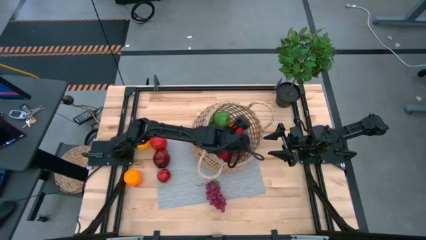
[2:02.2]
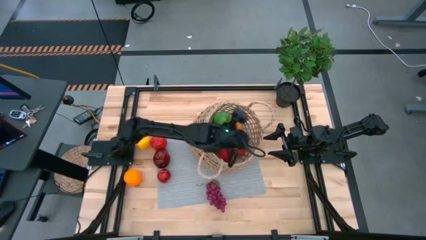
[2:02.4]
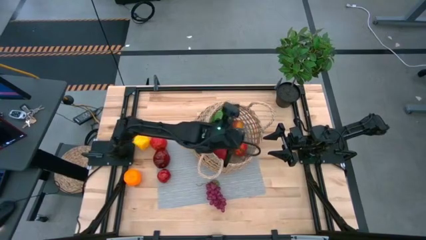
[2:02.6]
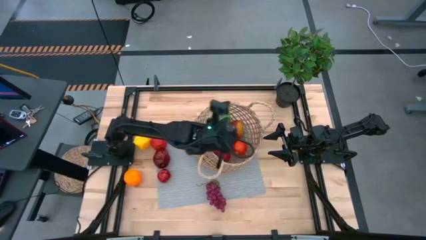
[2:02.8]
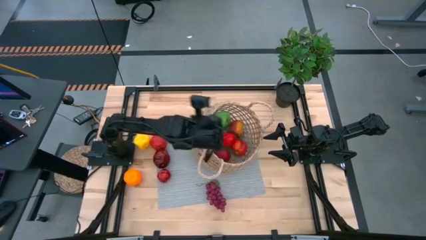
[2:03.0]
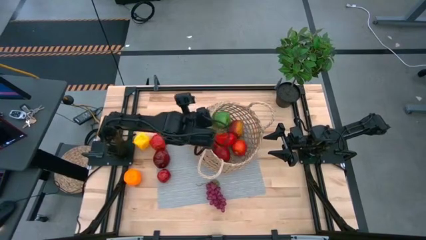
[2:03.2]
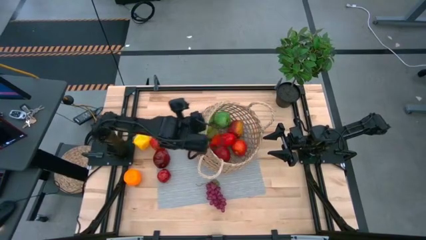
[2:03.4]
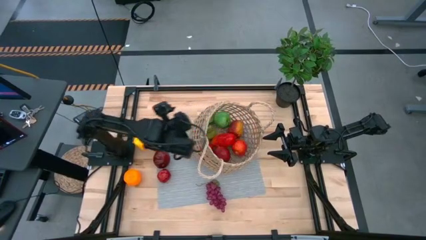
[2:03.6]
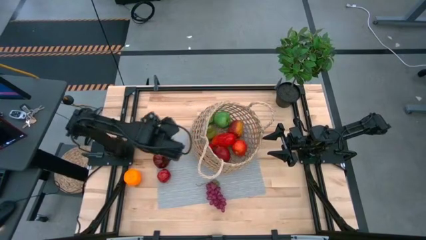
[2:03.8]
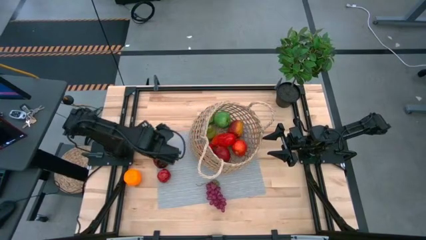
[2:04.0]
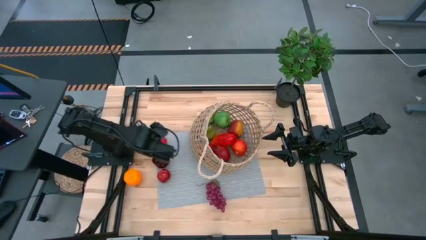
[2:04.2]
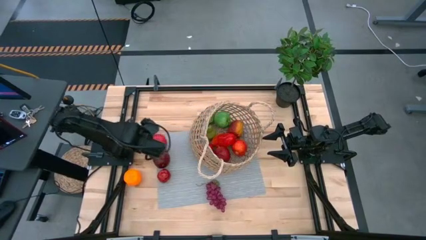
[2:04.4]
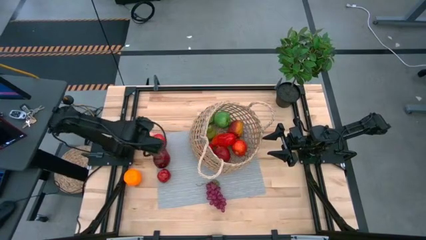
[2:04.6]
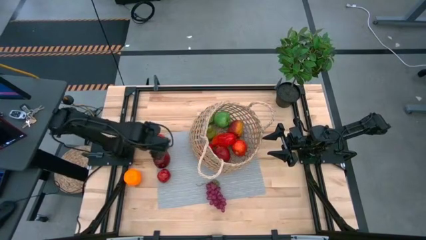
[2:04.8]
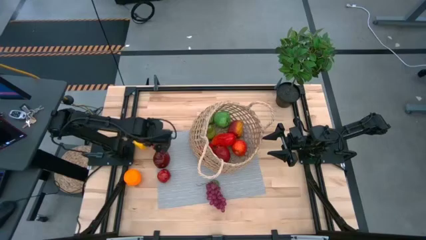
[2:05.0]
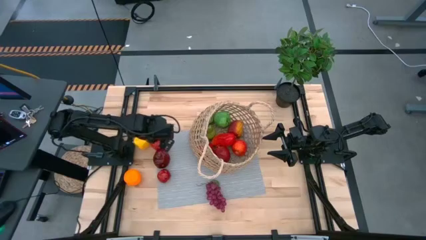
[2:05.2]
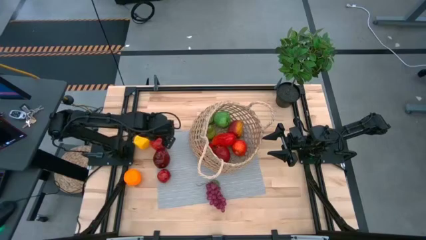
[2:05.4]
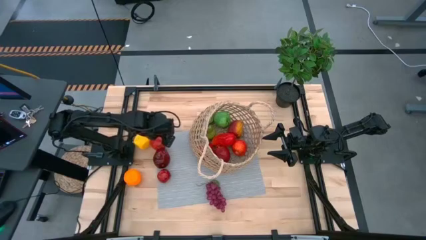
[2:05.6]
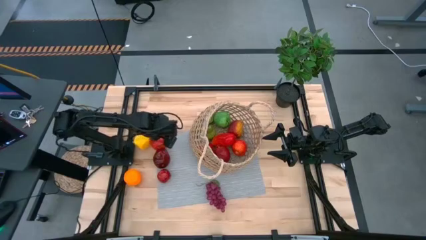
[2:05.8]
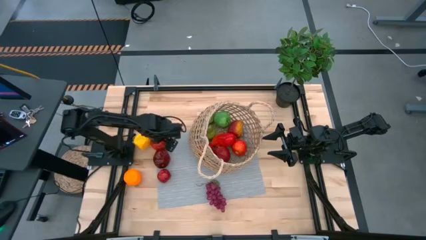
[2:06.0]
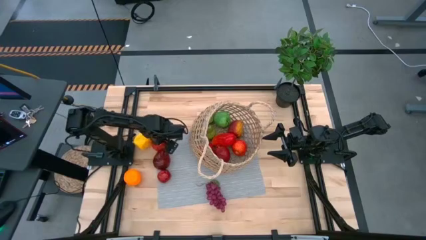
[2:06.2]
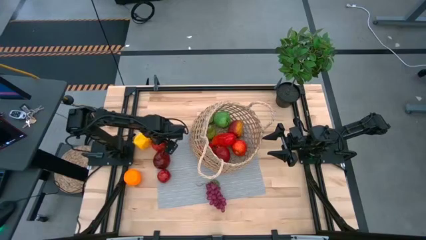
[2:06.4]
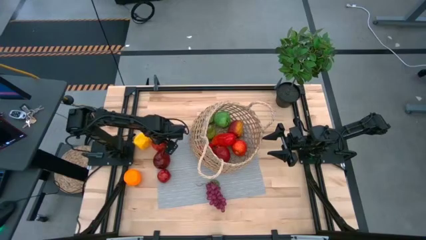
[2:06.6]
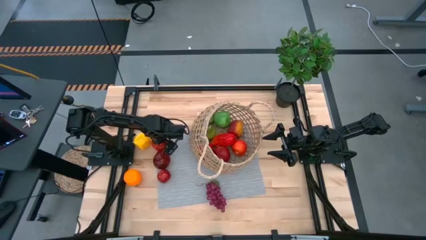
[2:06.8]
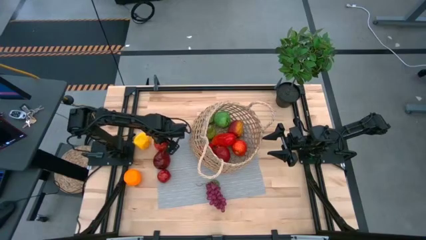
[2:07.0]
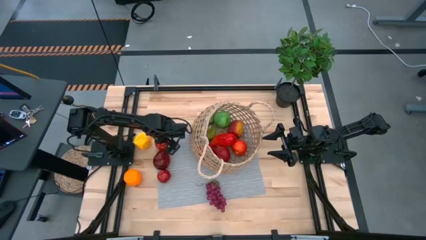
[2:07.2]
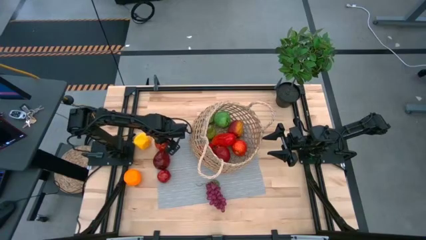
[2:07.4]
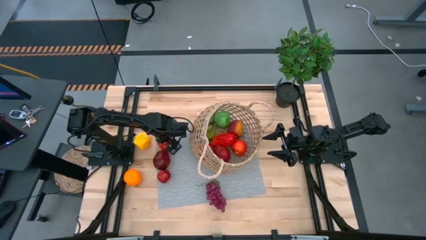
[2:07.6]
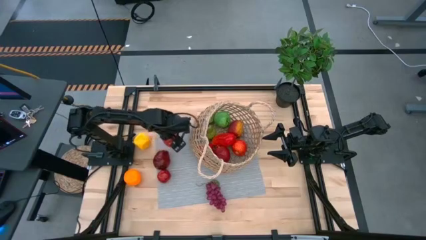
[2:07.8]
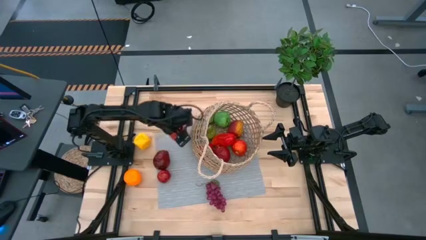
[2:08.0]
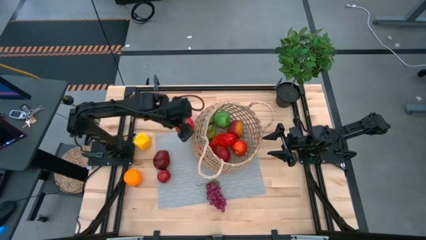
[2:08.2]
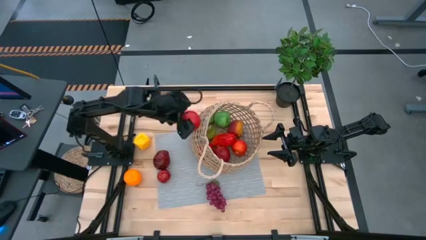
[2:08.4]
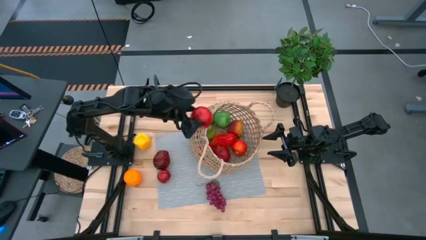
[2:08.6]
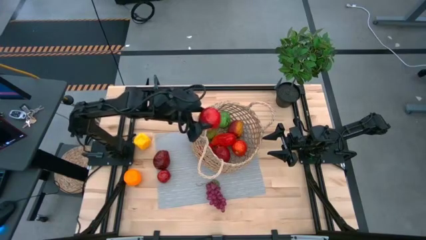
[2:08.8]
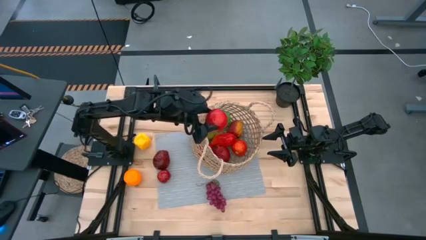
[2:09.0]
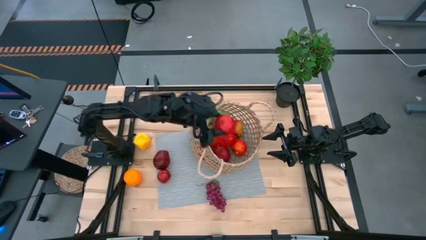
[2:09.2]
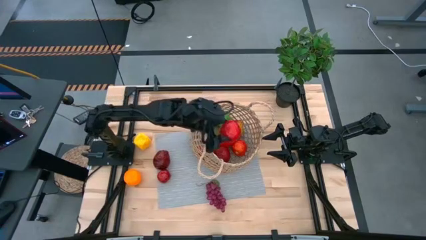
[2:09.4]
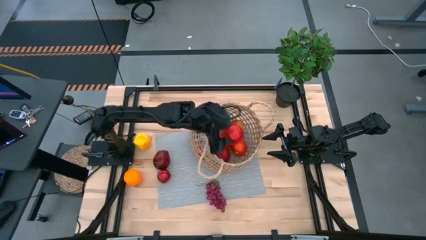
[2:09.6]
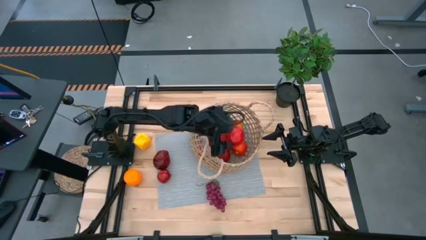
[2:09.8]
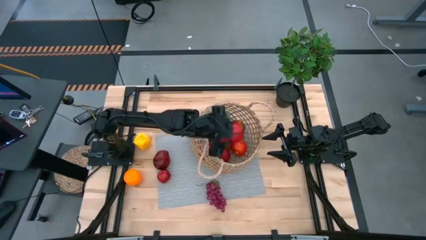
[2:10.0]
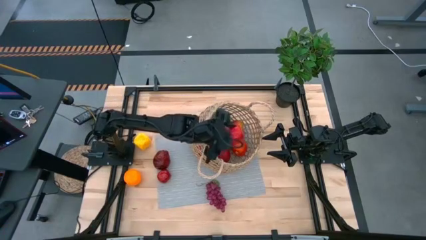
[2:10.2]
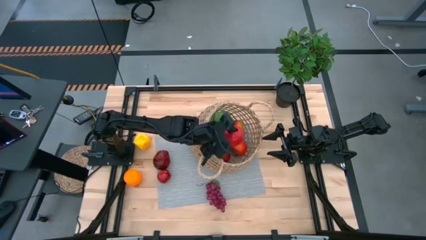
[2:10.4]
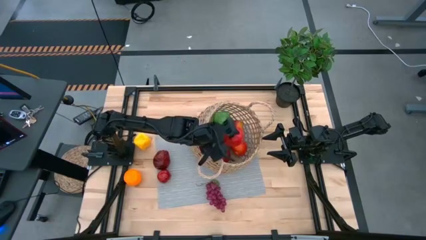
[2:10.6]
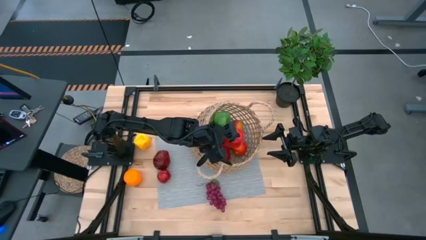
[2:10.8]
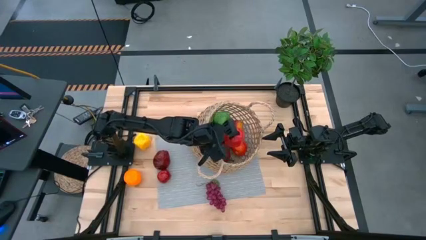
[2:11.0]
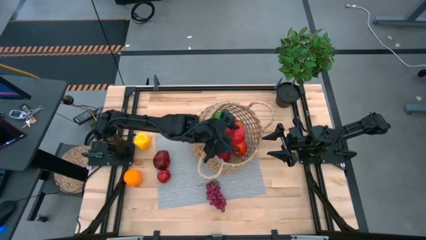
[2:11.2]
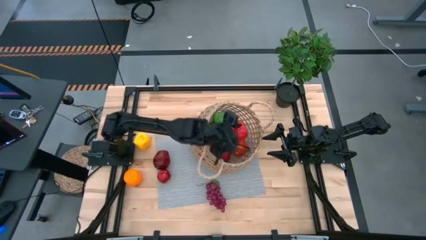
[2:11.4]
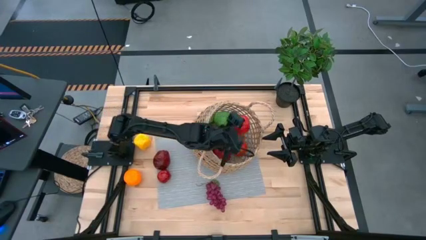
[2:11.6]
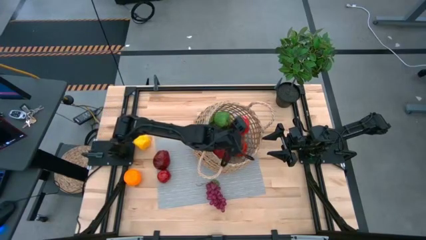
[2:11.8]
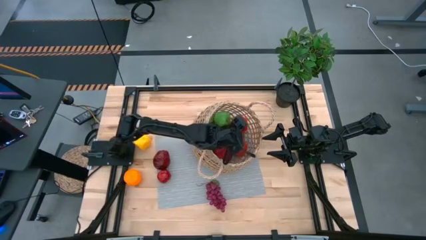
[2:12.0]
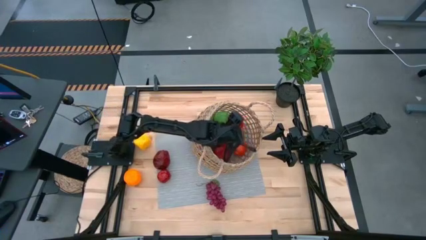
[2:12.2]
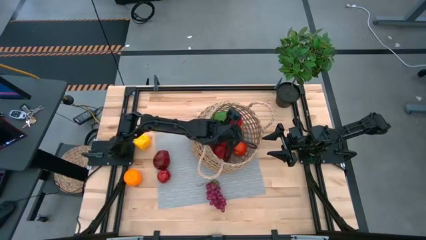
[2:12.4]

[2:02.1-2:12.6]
Task: Build produce basket
Put the red apple into the brown basket

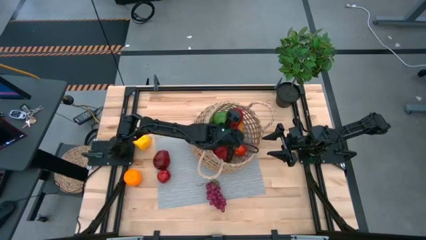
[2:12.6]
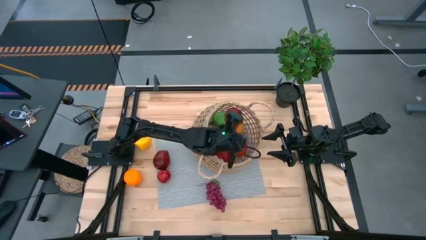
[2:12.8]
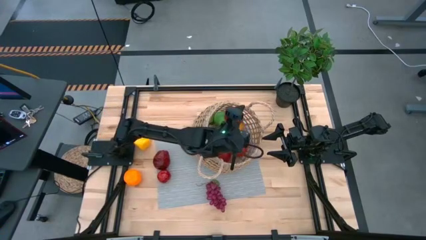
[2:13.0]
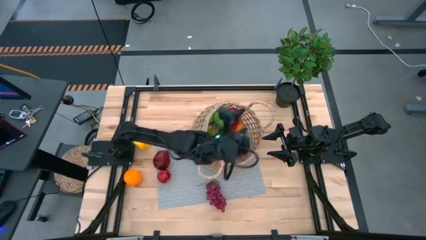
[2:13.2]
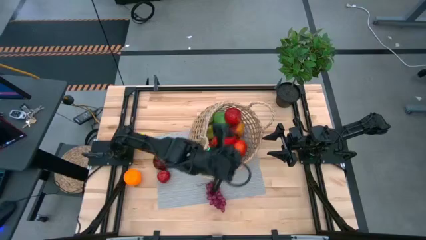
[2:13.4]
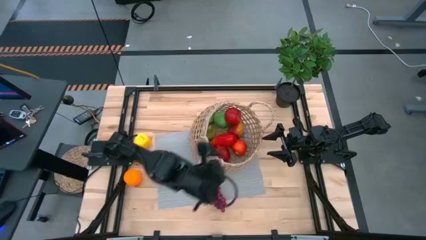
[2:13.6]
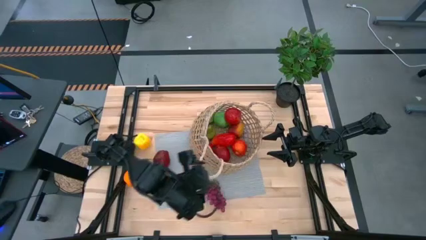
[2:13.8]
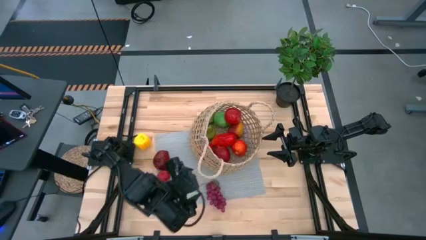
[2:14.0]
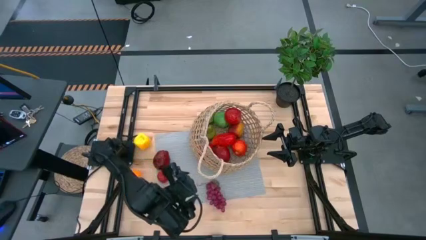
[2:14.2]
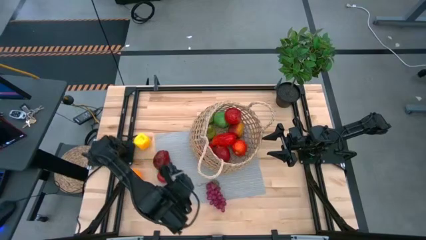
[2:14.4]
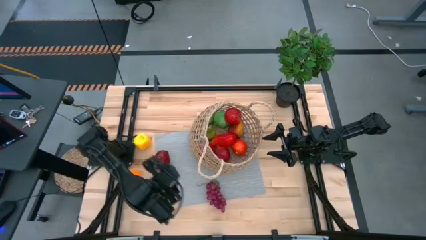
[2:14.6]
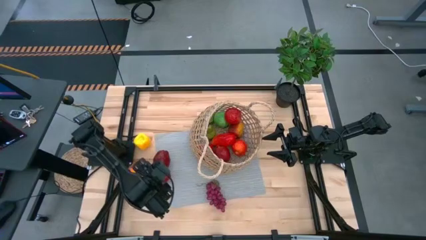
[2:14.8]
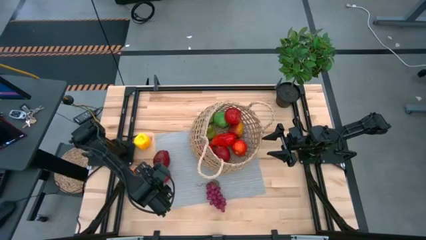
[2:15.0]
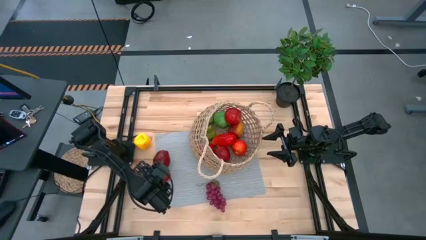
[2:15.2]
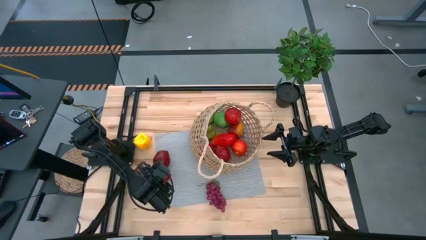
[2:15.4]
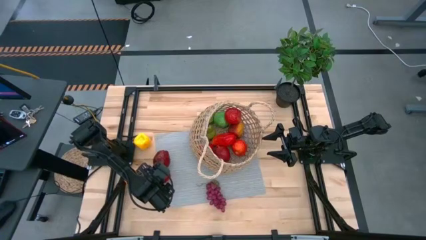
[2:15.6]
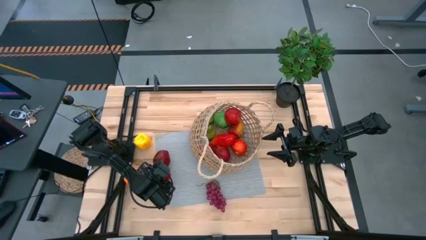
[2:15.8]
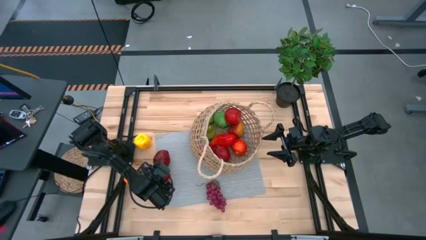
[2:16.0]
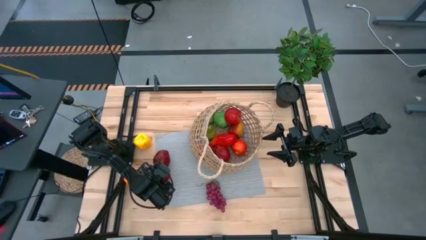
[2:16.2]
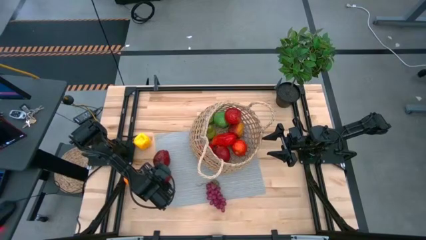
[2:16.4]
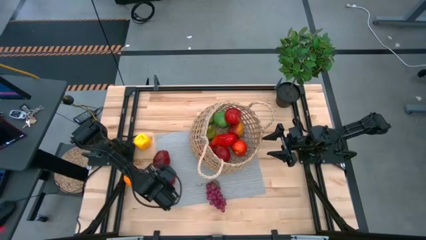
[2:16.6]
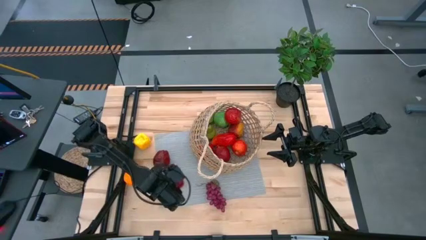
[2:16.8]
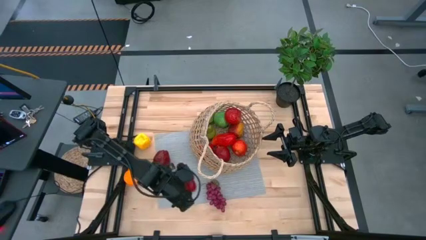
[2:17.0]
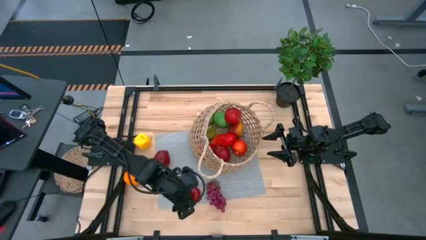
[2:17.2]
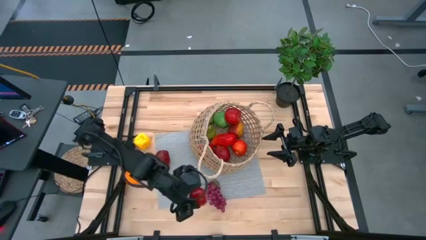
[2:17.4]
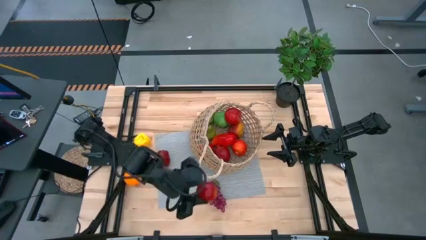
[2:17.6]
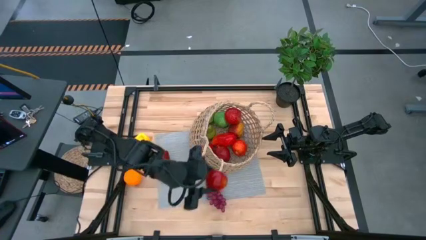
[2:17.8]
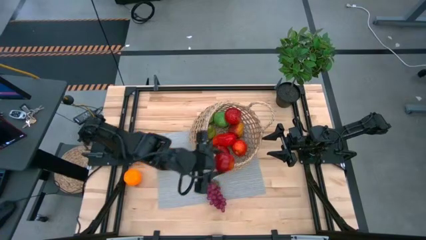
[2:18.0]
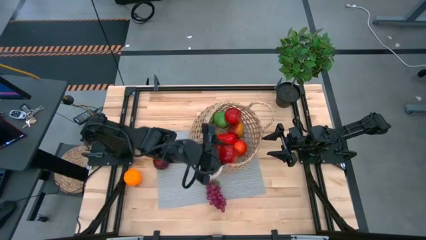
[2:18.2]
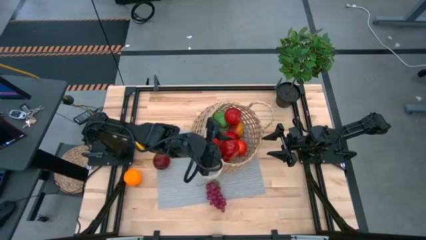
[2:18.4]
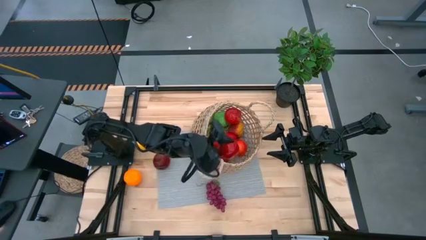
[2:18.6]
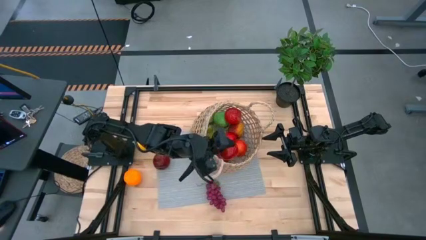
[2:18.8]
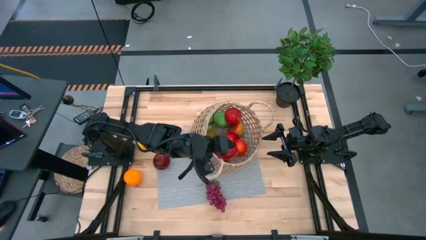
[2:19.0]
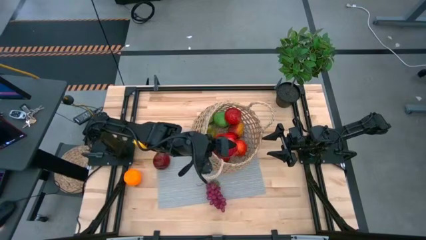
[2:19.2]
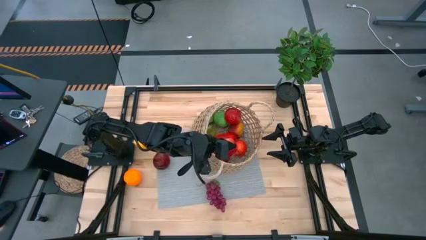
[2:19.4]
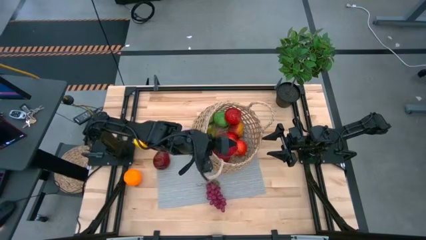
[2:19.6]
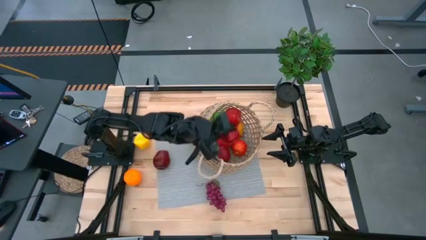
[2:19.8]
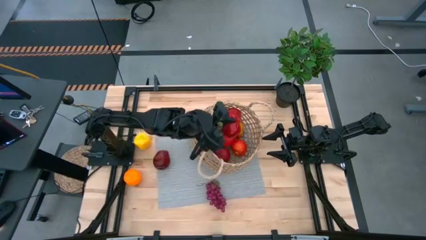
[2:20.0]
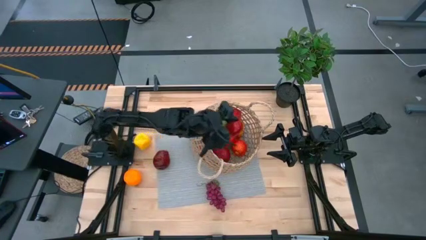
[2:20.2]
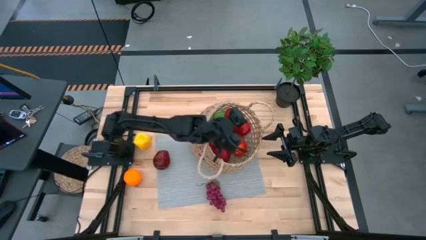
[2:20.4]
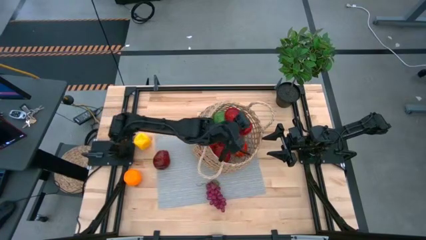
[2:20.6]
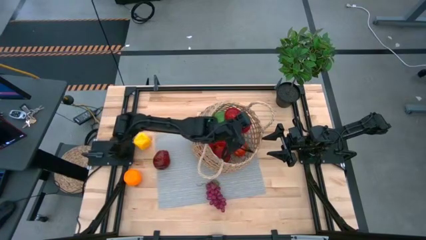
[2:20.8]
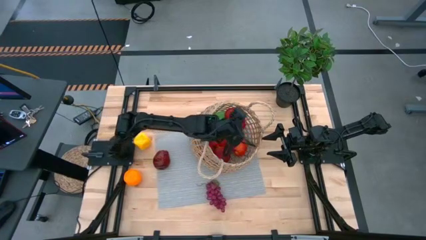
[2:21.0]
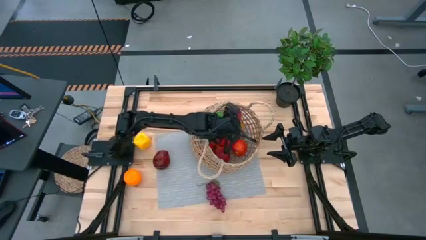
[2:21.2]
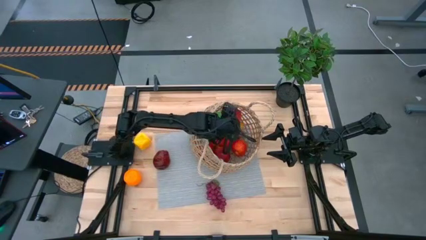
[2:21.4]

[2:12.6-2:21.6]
Put the red apple into the brown basket
